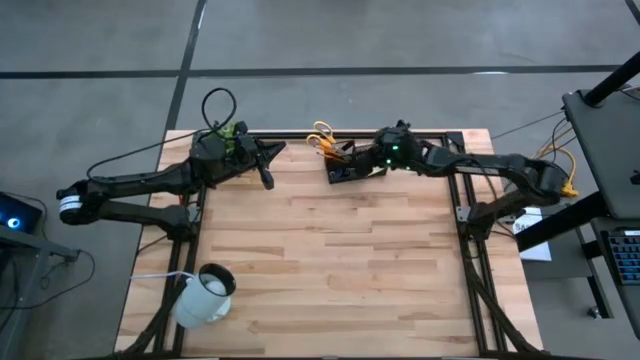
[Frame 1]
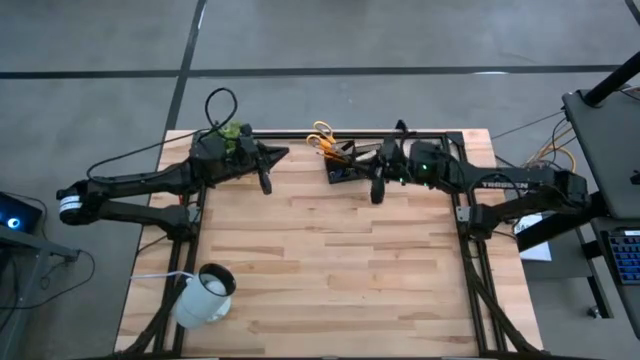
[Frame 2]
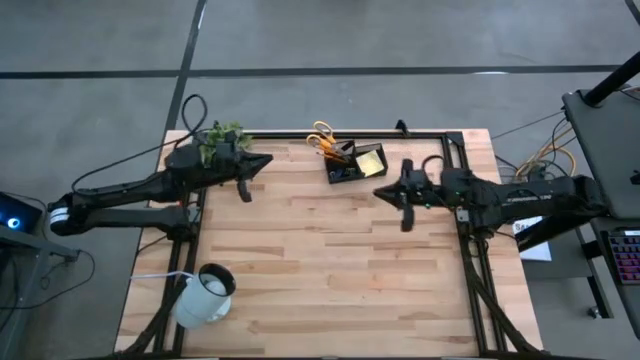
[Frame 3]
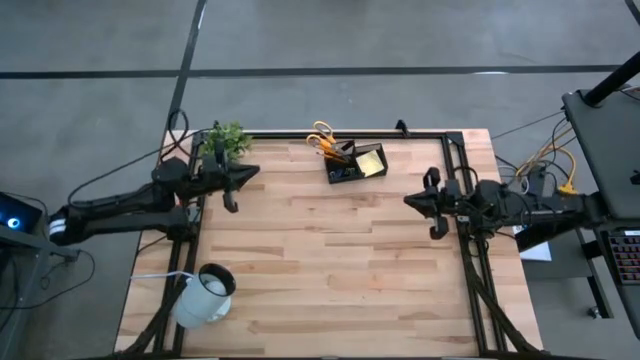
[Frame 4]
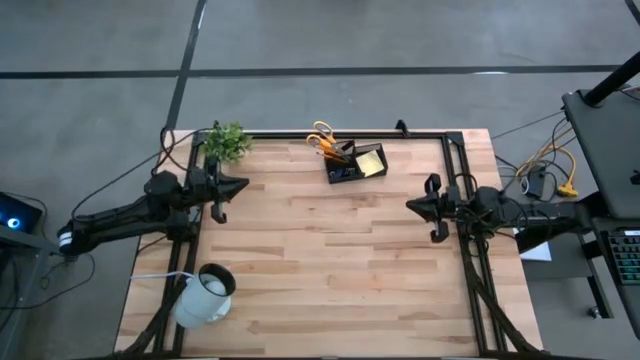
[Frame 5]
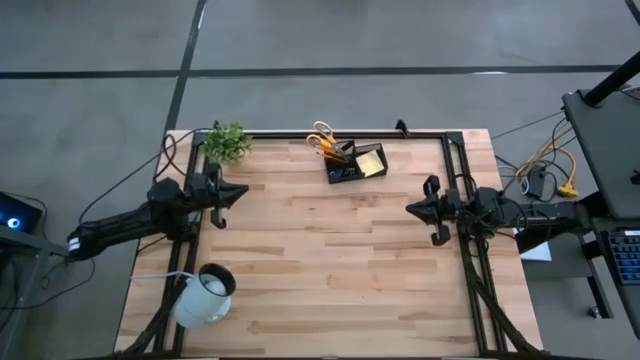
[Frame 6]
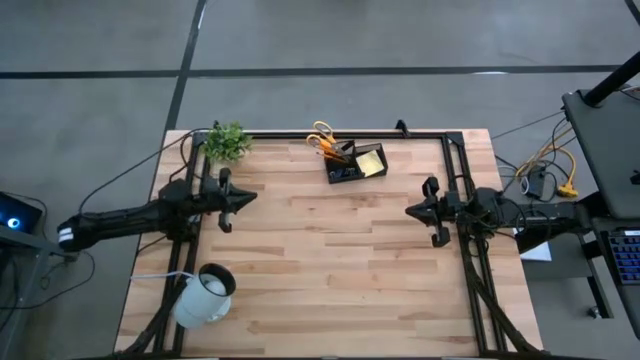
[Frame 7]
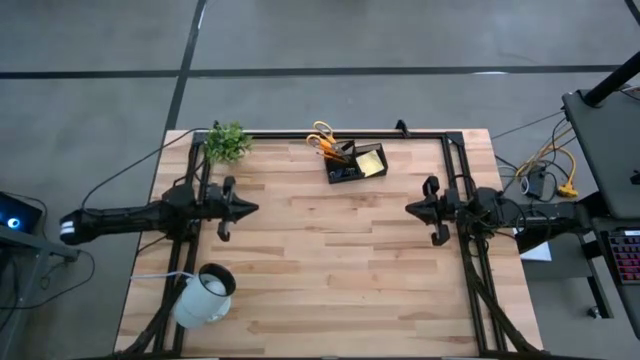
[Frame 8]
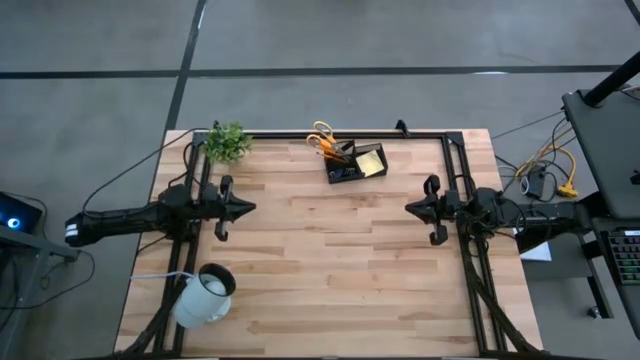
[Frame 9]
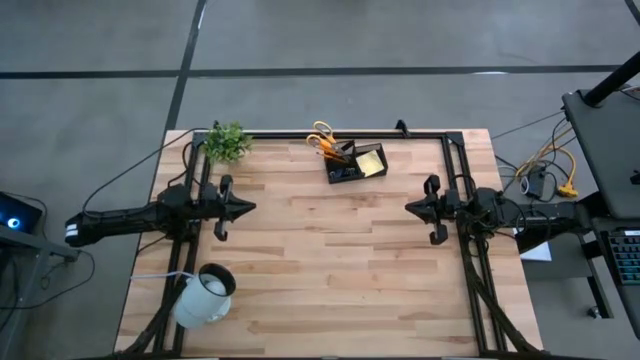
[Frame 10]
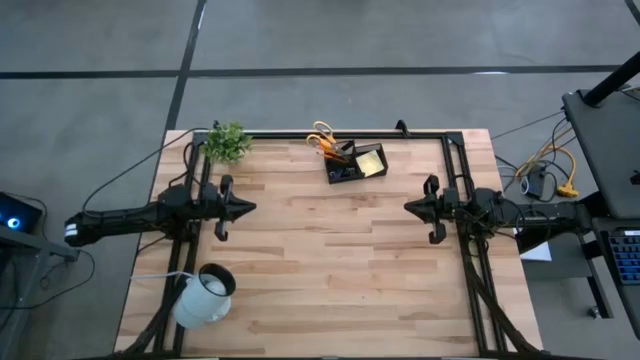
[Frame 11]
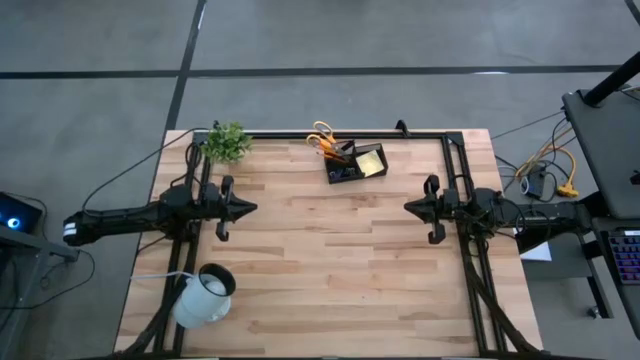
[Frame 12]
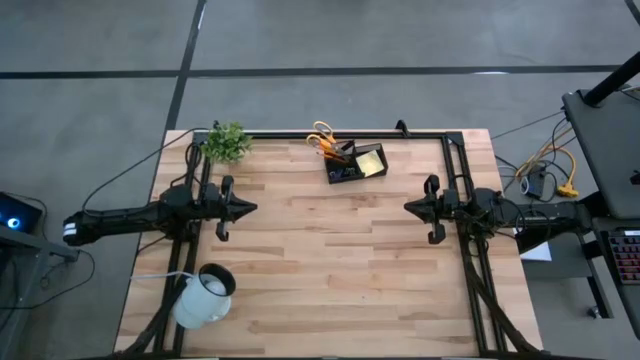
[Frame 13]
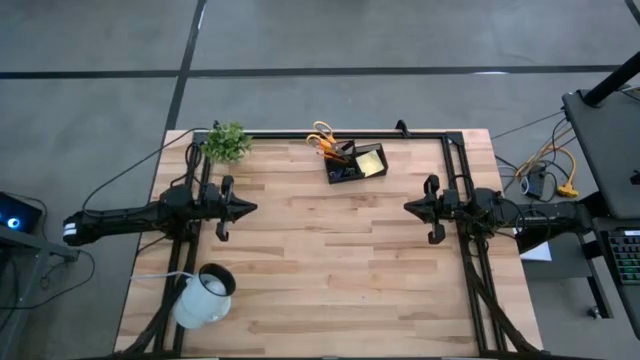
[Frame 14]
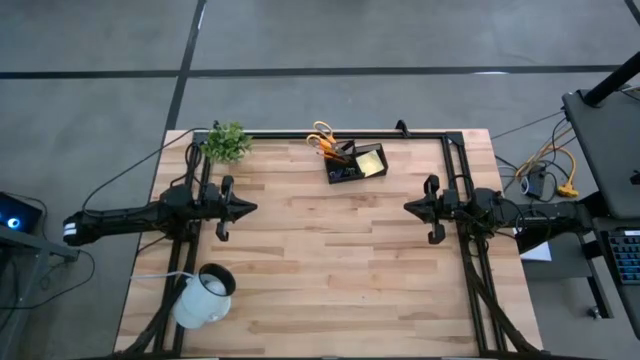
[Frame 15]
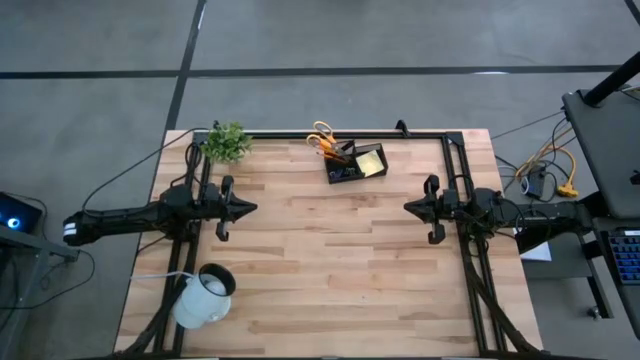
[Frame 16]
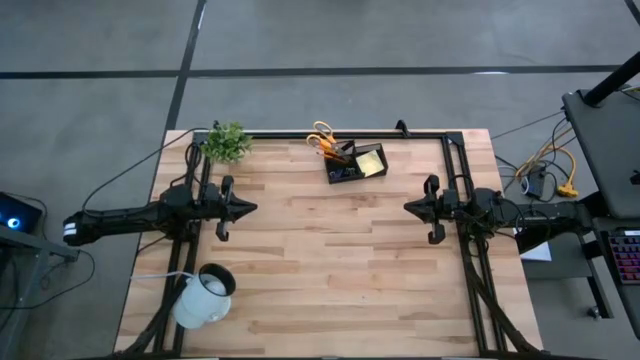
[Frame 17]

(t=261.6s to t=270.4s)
Task: Pick and place office supplies into organizer
Return to Home Position

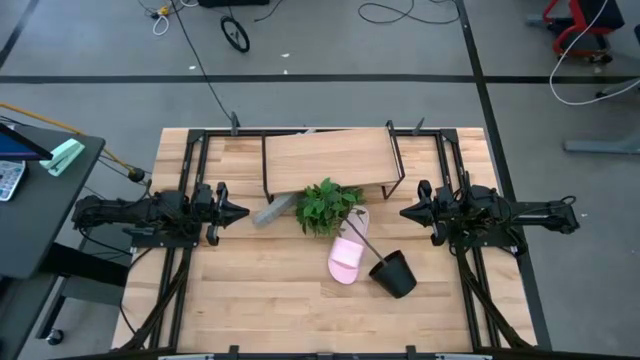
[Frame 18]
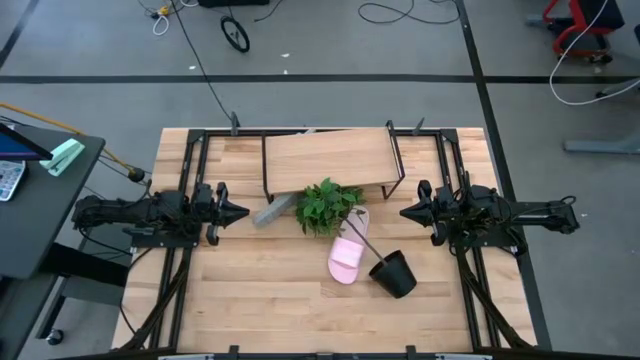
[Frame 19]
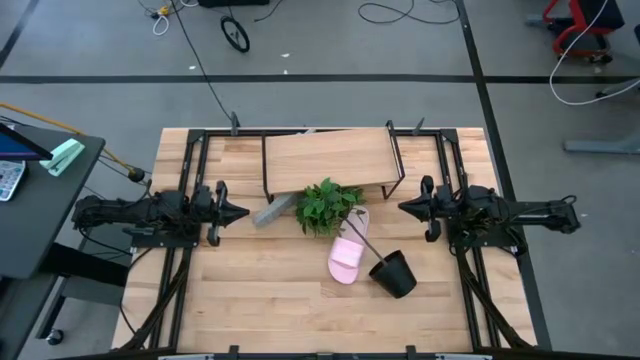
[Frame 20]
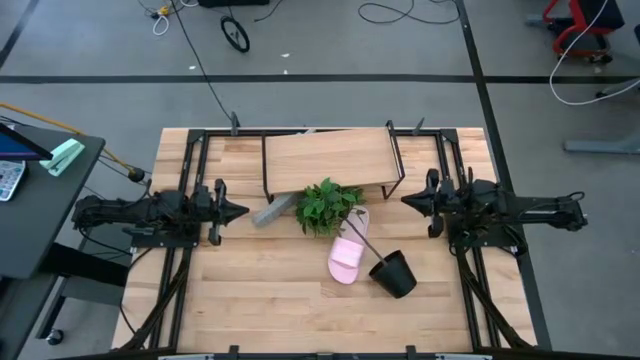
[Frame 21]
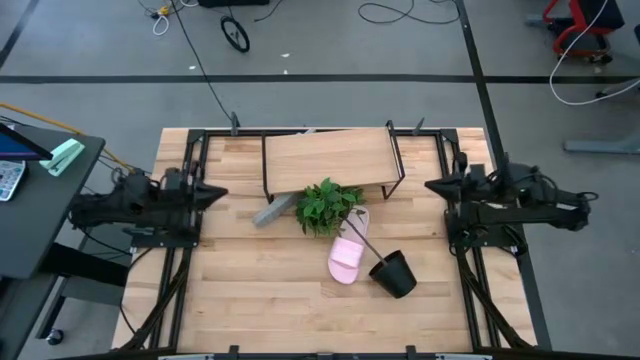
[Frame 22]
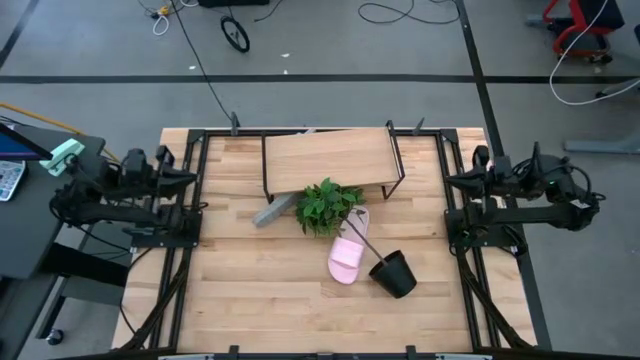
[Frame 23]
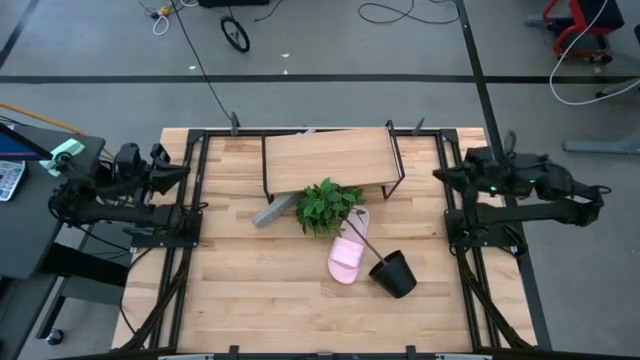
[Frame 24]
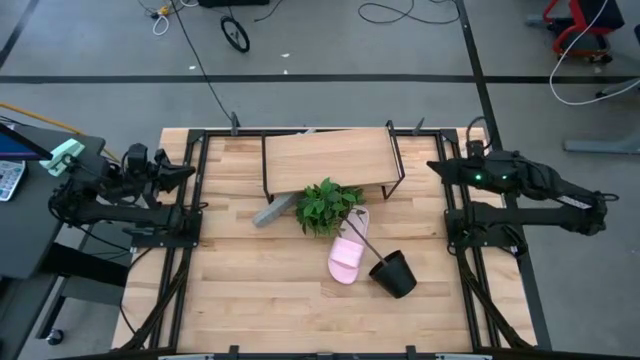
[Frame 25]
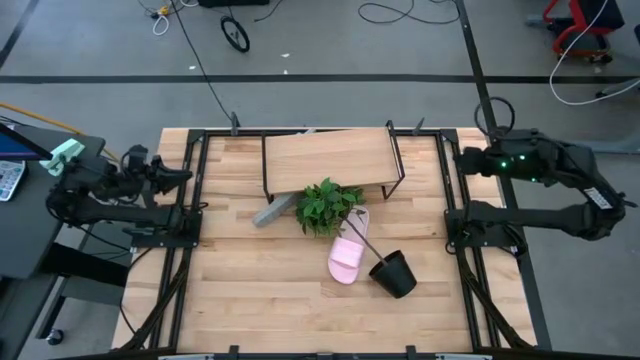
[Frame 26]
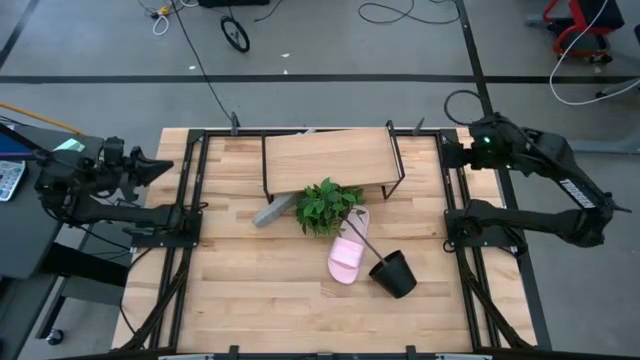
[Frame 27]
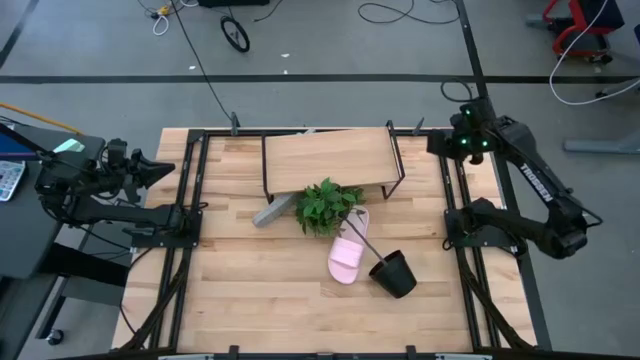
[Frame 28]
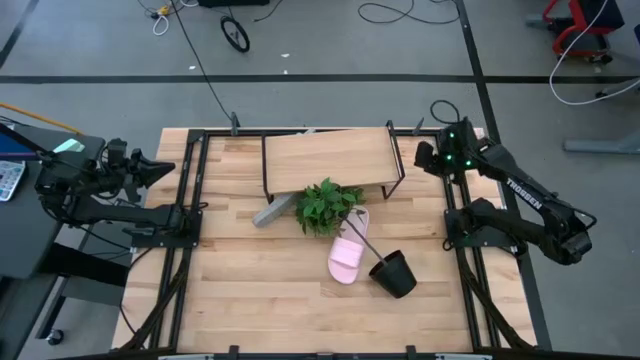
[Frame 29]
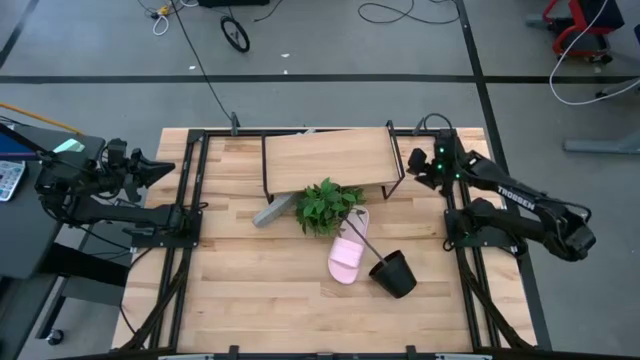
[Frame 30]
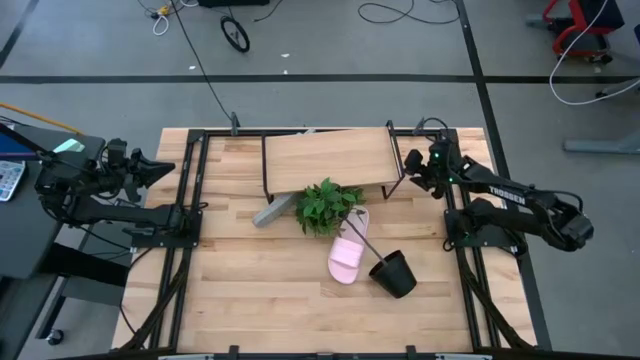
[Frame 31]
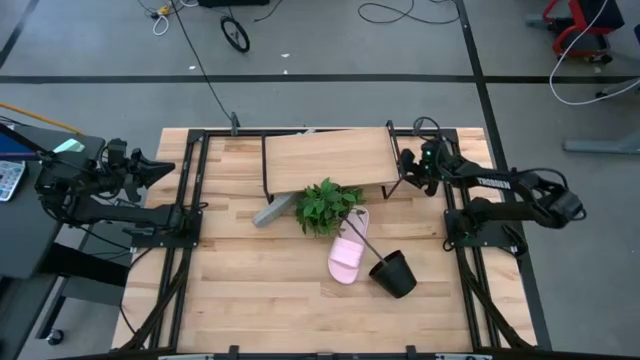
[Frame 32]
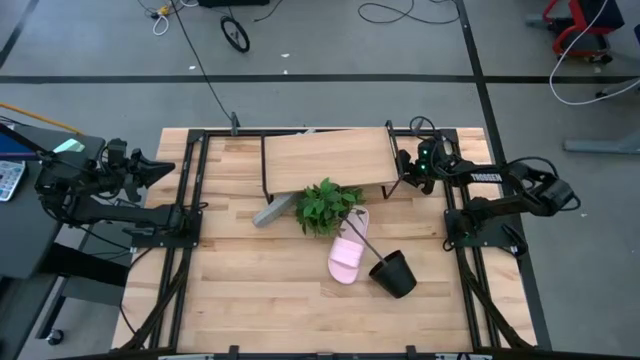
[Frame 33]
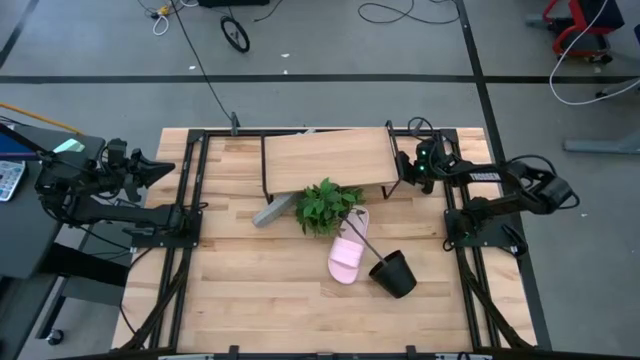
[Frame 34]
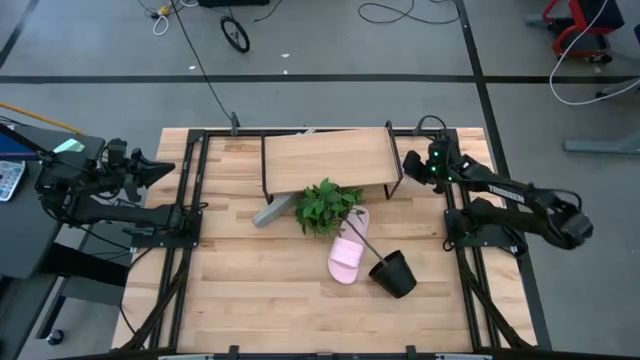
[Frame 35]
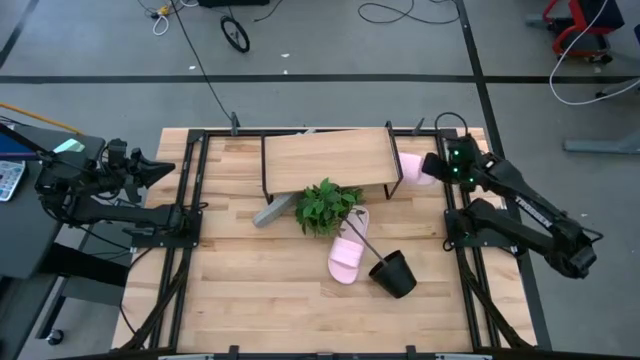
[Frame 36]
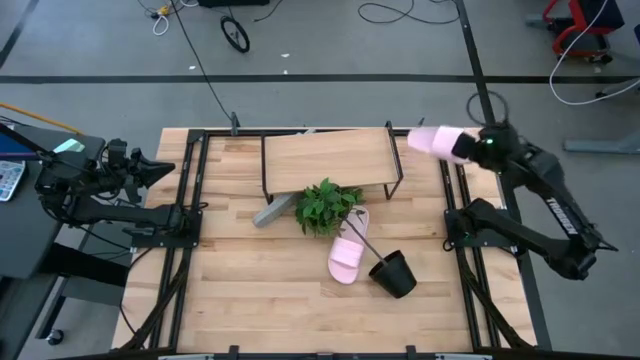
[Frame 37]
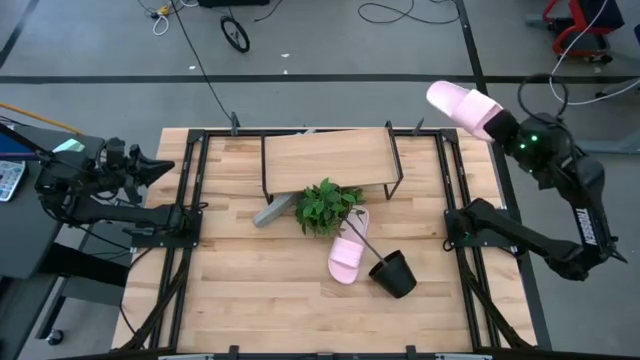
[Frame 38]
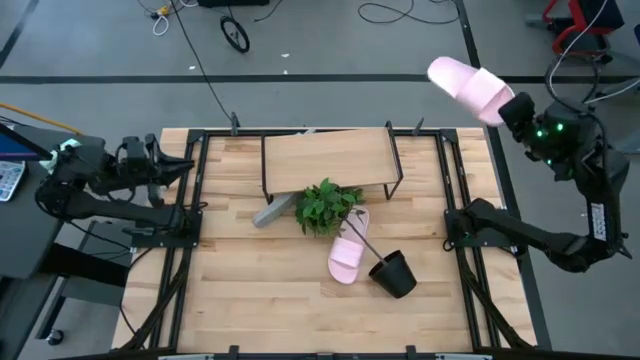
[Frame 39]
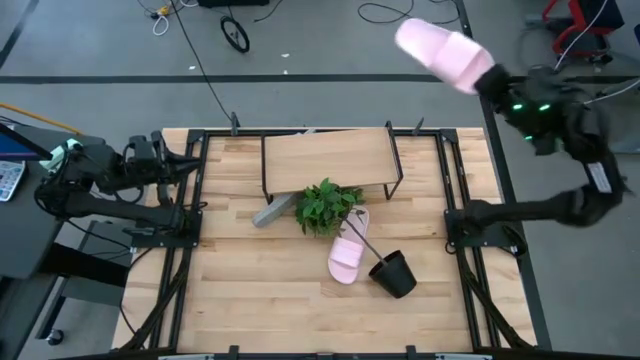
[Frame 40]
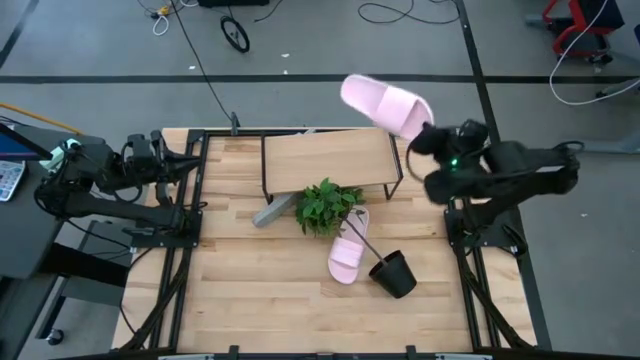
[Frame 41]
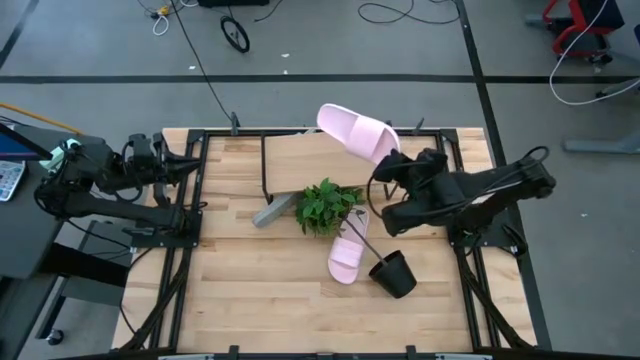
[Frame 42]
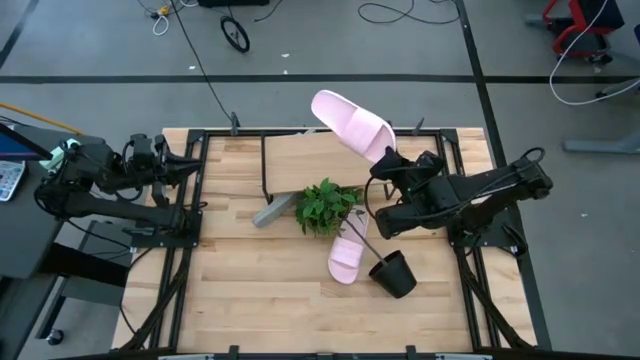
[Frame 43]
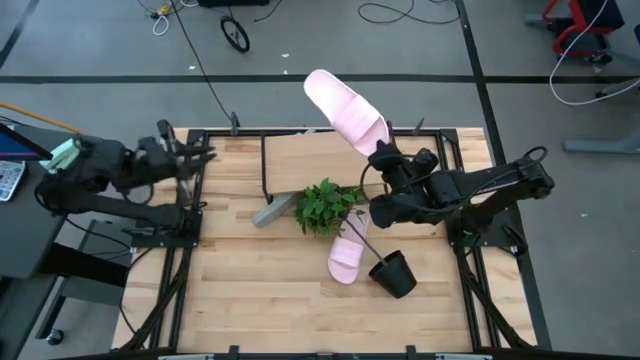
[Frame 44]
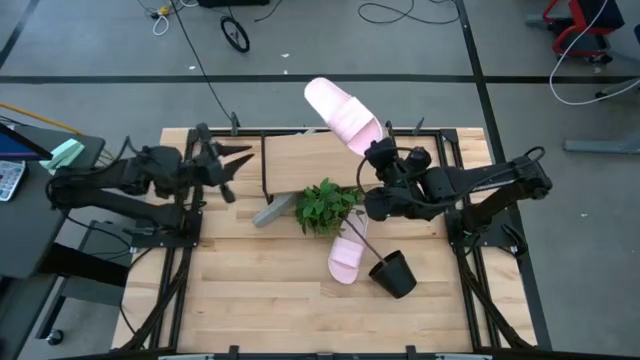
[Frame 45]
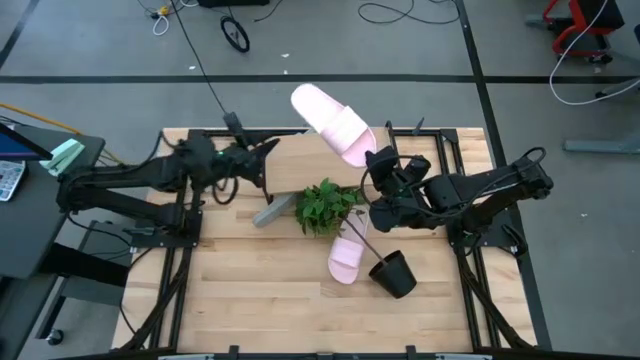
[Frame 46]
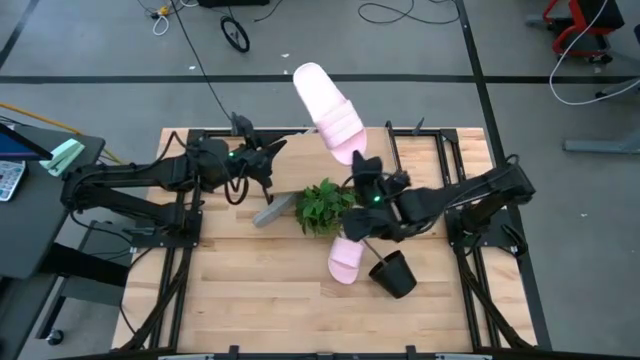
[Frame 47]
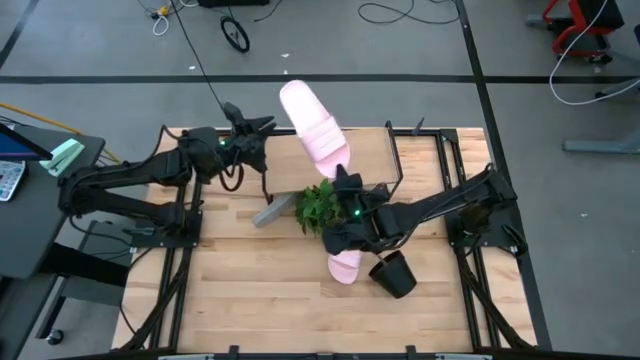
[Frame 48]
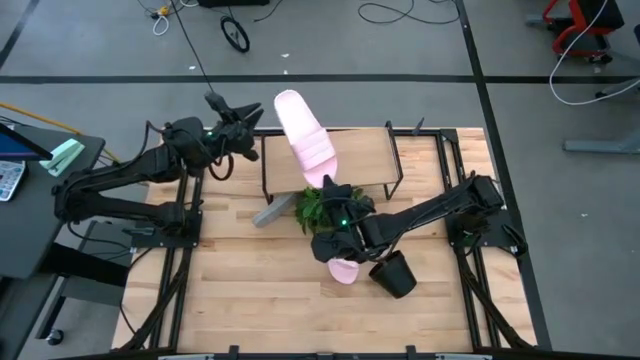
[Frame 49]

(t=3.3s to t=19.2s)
Task: Pick and place slides into the shelf
Put the top pink slides on the shelf
